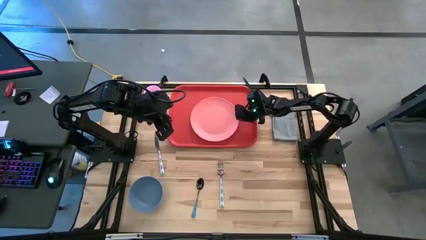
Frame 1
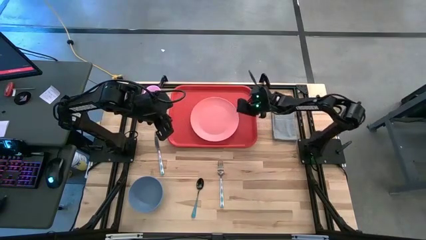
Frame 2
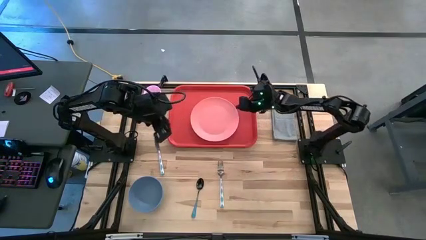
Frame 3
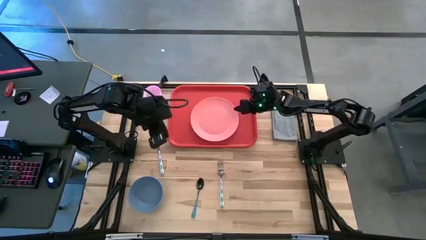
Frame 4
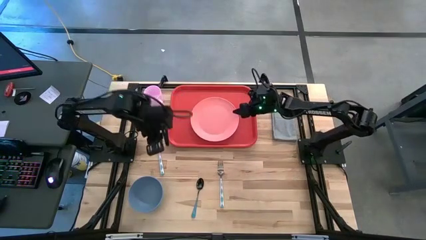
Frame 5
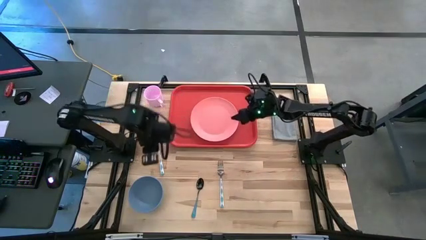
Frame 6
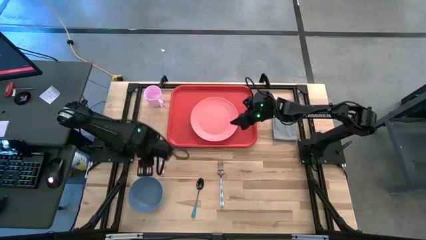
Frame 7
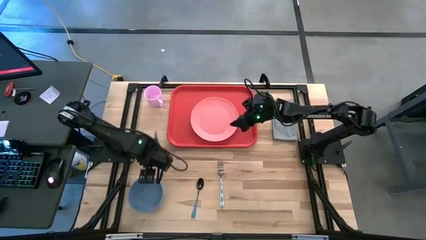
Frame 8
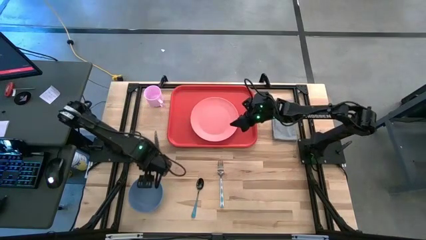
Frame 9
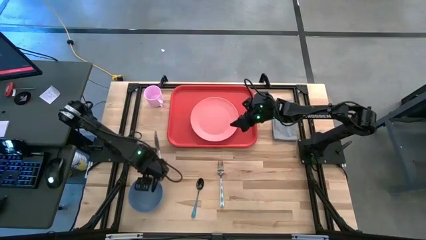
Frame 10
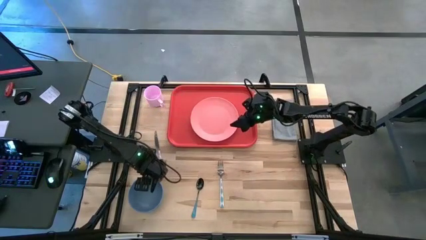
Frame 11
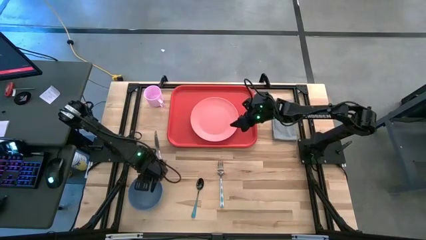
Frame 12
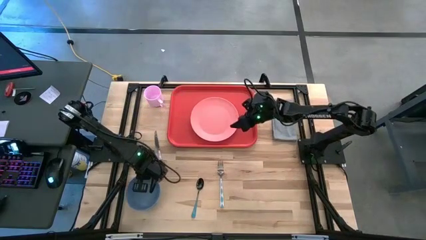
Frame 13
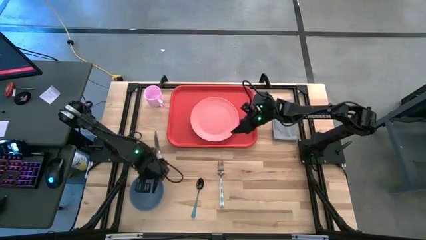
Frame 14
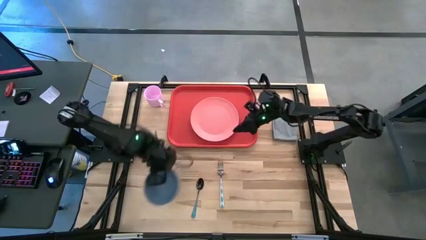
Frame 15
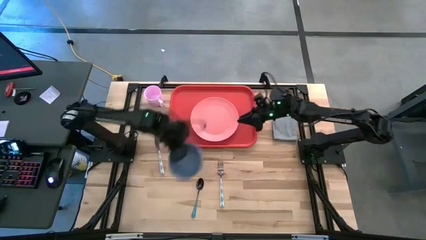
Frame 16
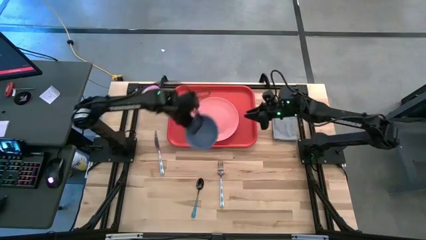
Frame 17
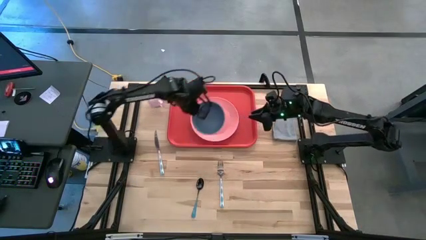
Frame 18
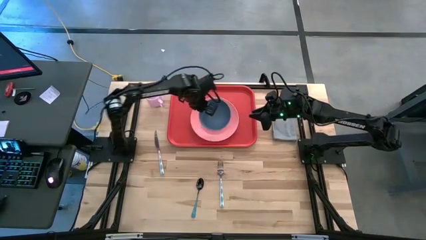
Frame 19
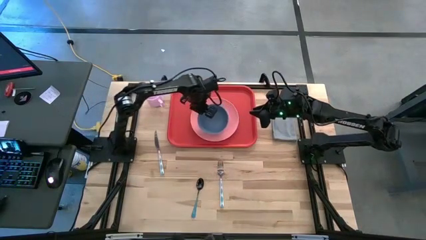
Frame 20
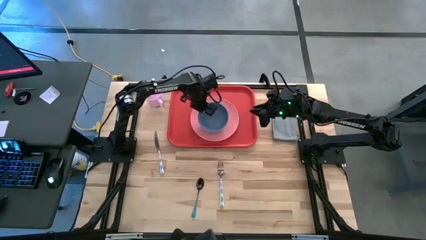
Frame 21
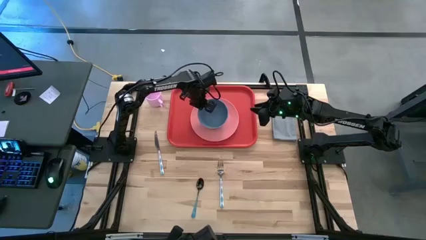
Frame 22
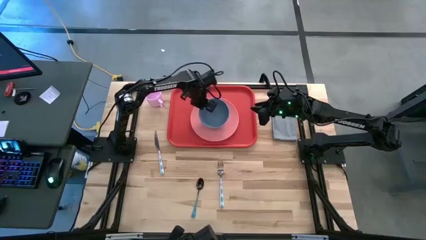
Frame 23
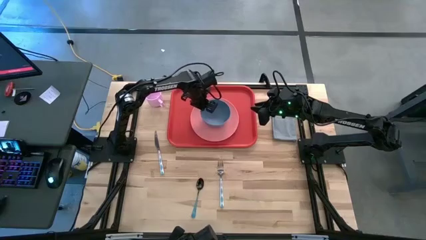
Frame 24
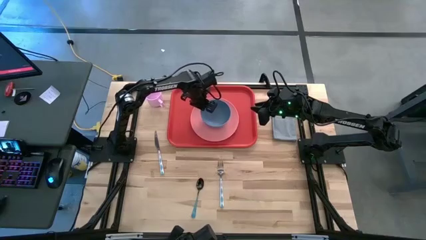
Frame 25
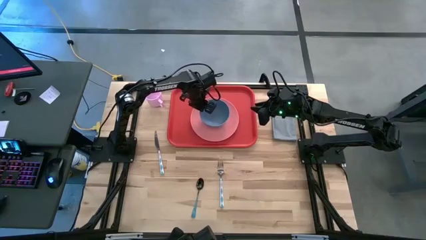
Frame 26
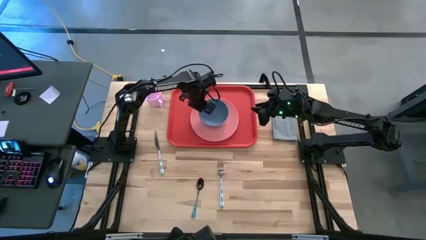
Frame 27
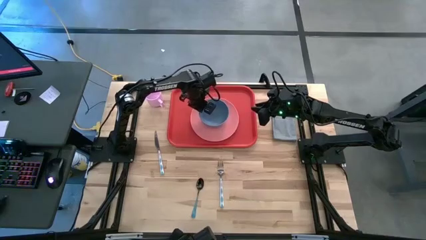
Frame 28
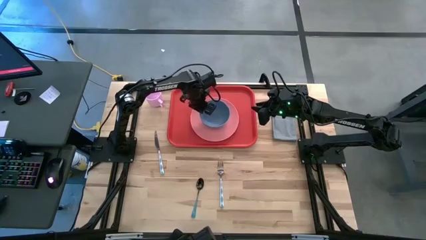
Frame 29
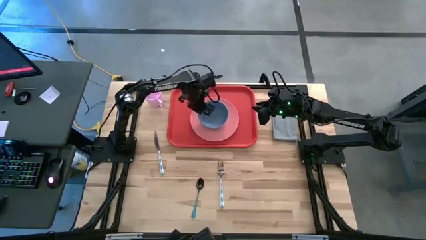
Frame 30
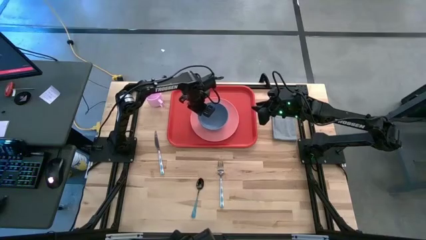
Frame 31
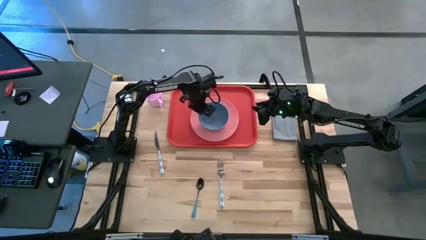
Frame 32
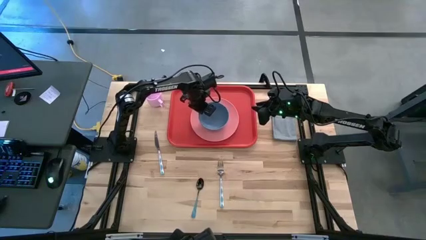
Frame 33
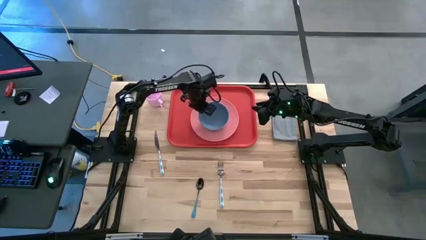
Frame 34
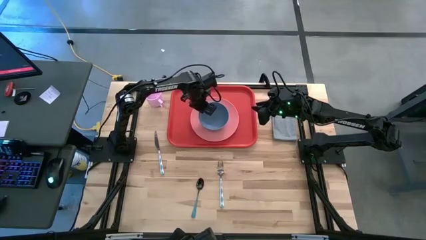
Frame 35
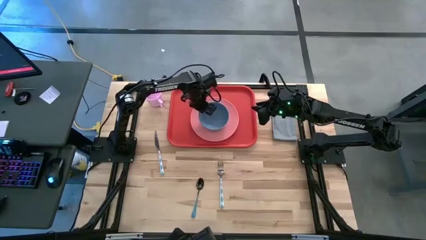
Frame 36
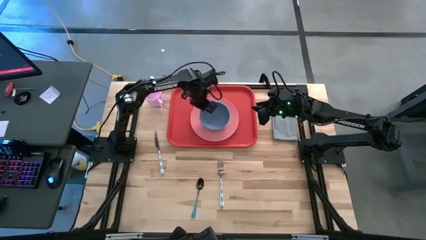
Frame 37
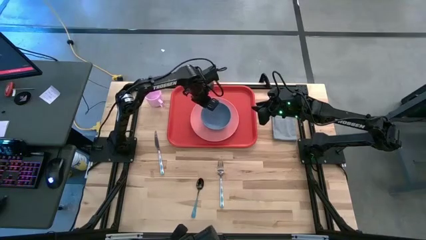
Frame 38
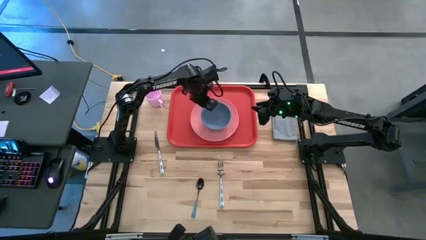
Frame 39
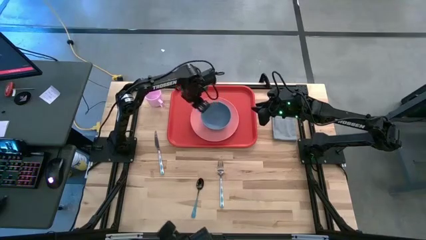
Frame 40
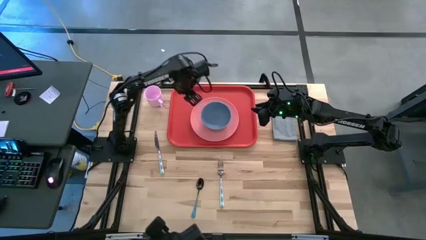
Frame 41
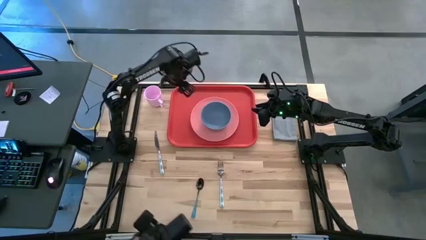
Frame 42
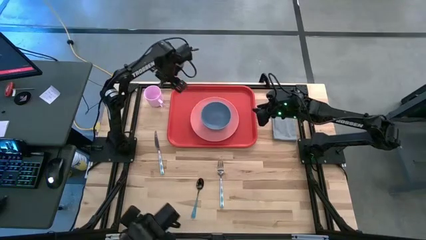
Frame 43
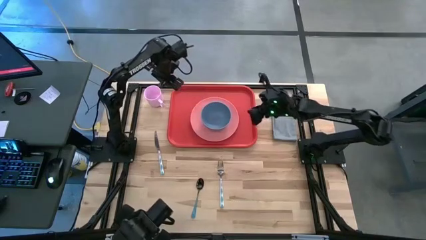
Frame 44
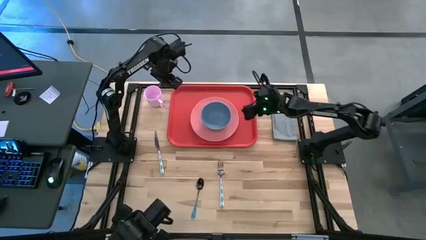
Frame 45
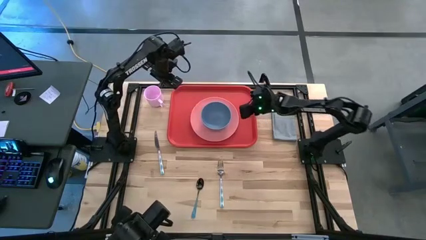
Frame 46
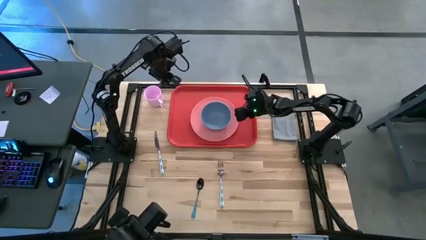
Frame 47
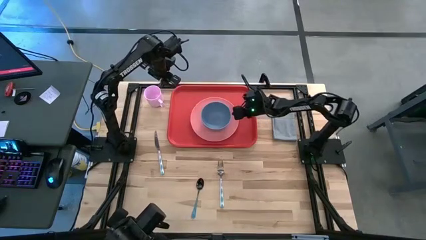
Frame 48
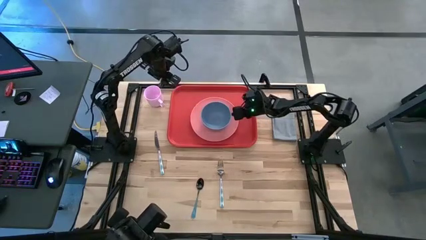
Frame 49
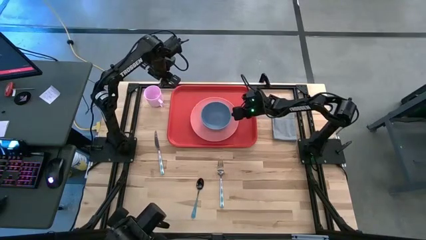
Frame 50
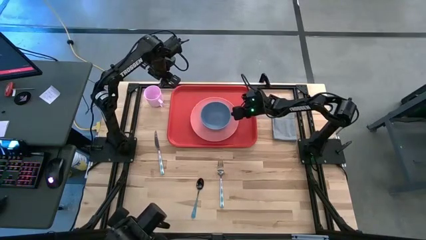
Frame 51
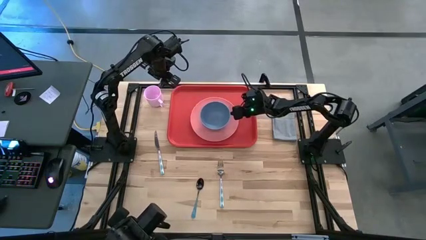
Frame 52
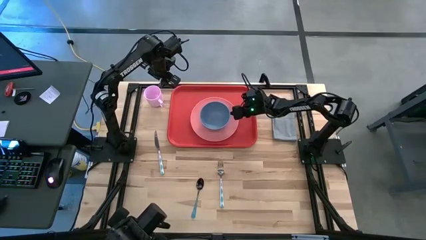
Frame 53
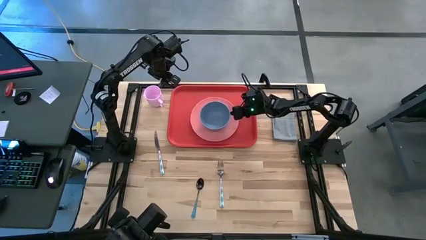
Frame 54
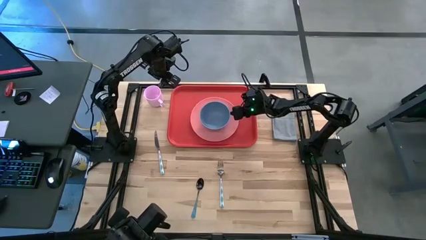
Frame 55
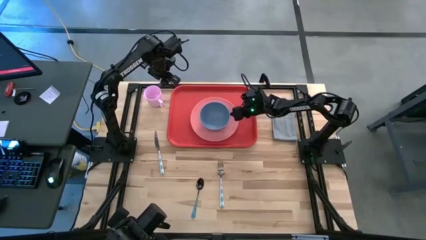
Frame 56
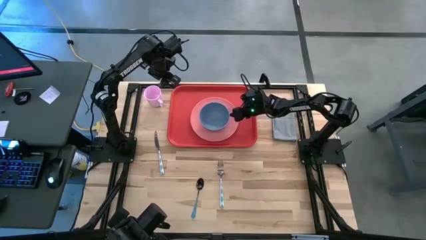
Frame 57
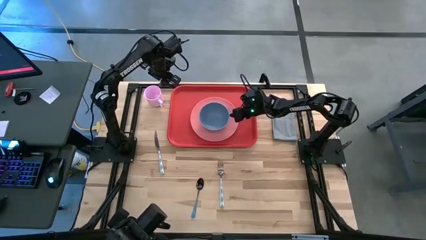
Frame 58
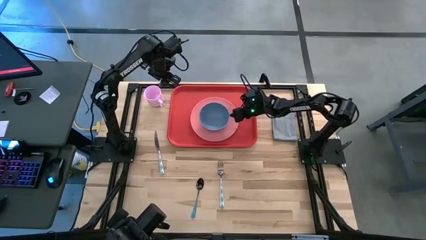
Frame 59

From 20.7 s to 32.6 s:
Task: Set up tray
Put the blue bowl on the pink plate

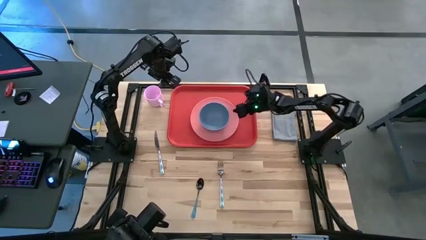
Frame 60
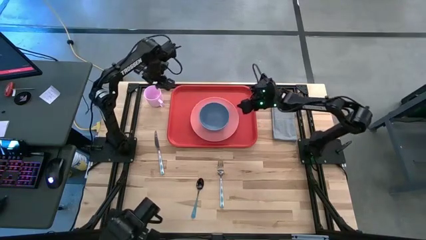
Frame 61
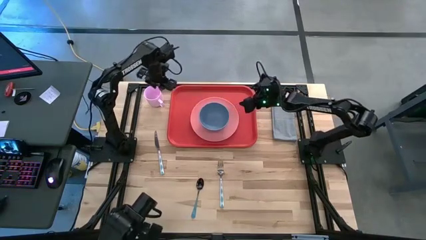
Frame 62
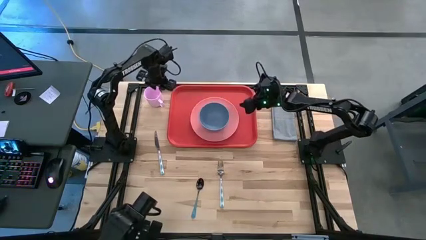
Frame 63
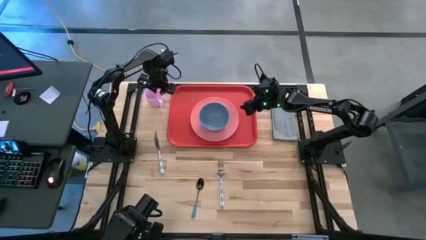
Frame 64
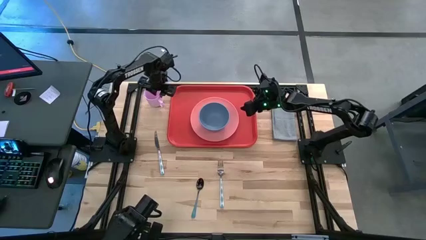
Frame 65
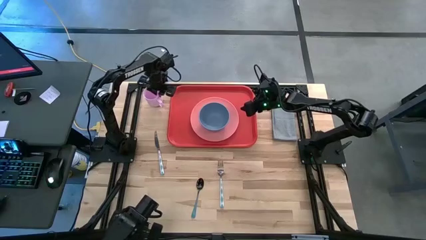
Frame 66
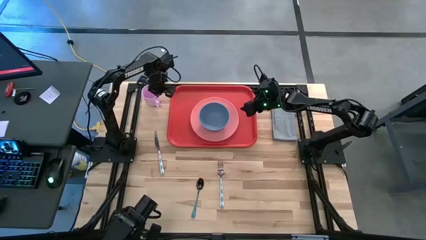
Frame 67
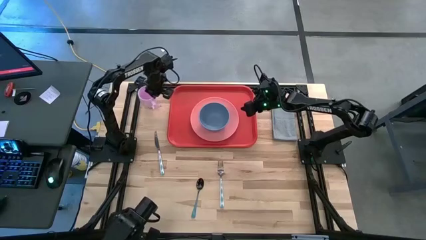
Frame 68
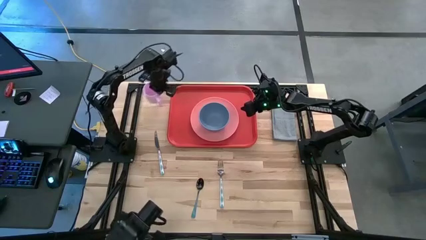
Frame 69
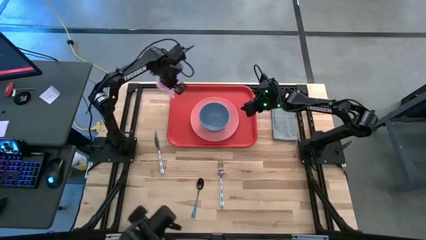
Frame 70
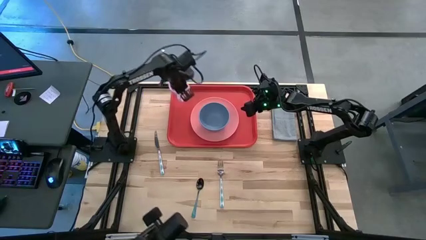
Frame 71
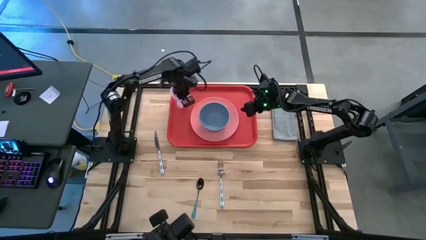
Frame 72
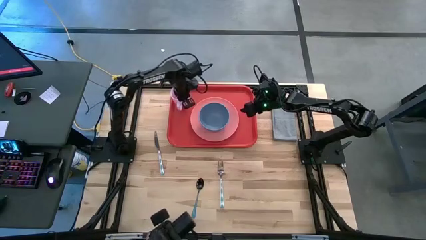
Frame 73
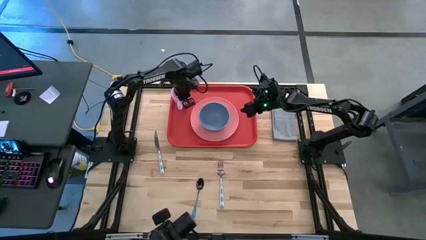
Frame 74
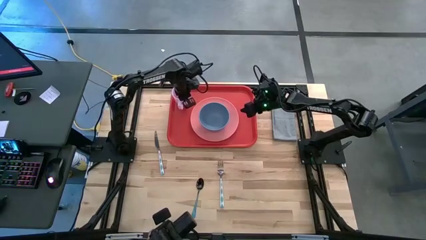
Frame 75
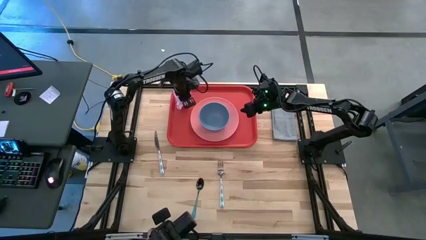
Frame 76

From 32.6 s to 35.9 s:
Put the pink mug on the red serving tray to the top left of the pink plate

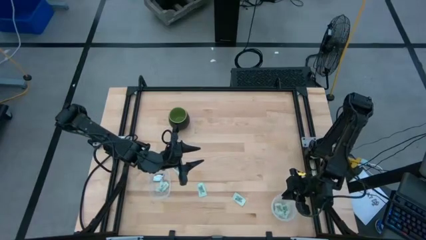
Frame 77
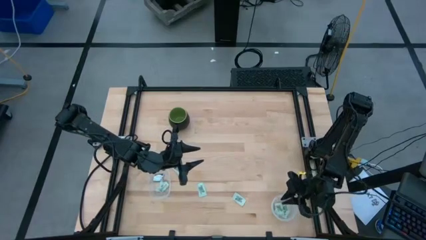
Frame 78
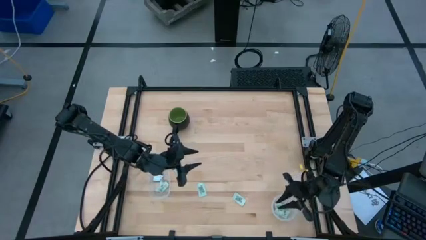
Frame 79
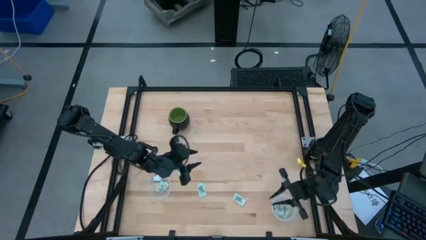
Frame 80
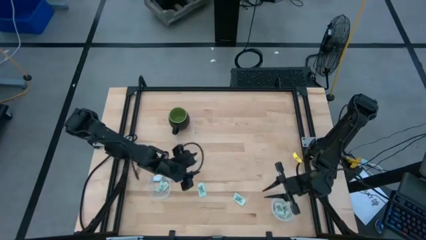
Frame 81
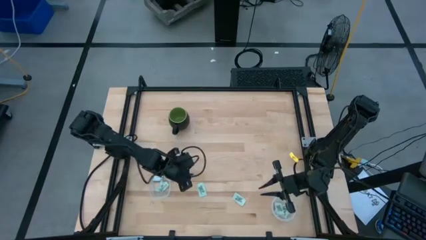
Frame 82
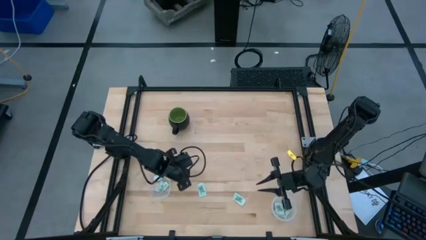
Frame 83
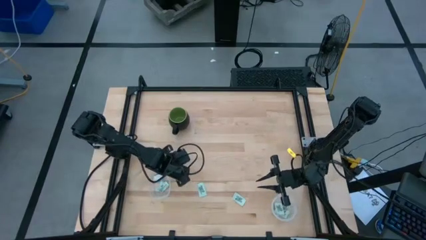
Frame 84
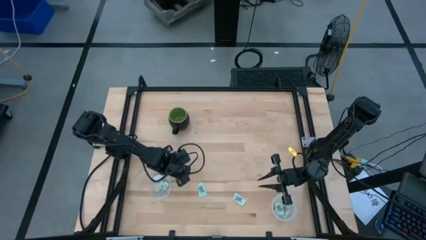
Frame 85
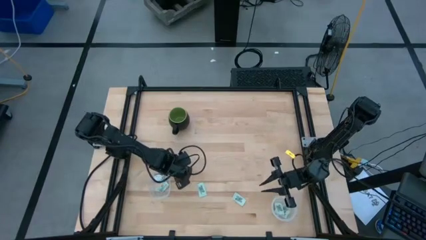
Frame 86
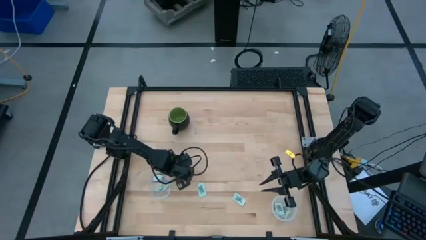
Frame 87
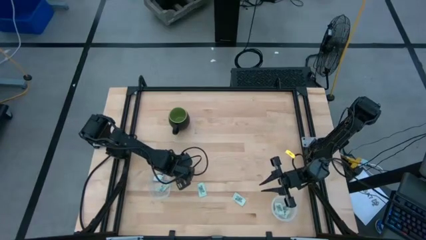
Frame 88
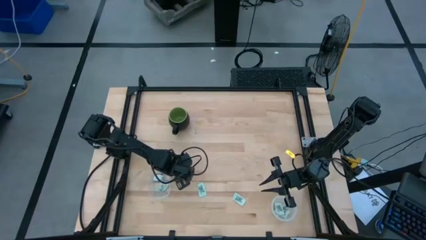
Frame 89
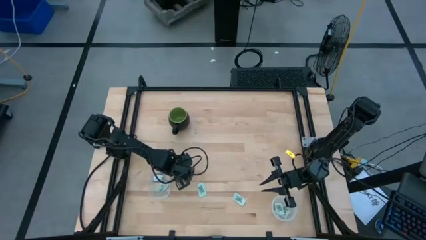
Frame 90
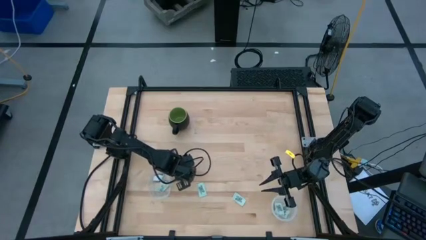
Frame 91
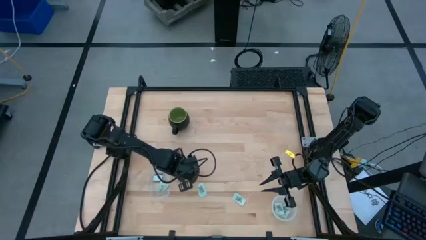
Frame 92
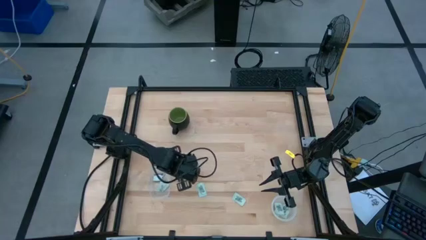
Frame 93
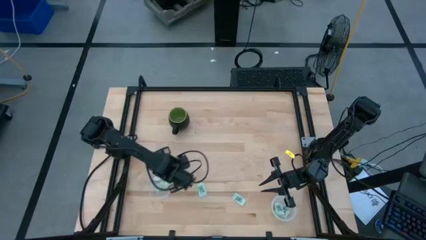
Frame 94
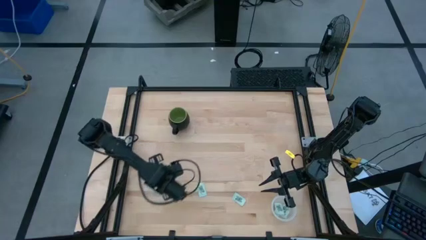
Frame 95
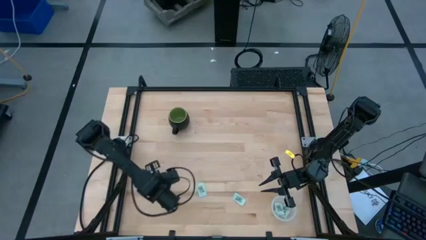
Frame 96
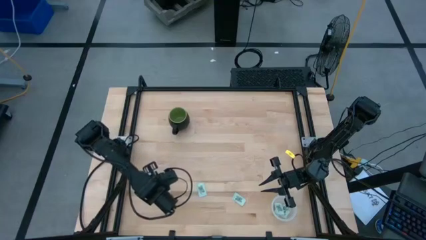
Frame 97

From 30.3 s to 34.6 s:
Task: Pick and place Stevia / Truvia into bins
Put the Stevia packet into the top left transparent container
